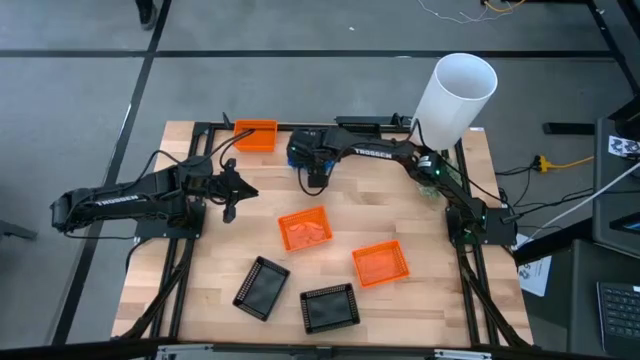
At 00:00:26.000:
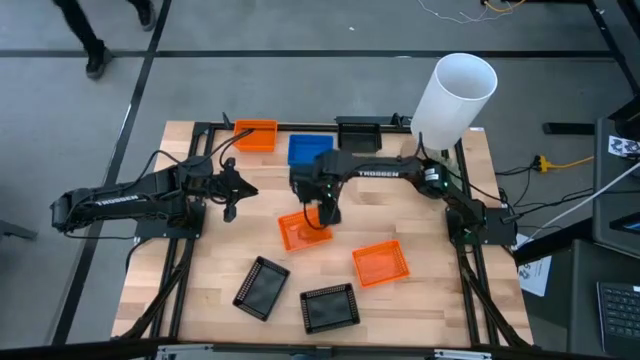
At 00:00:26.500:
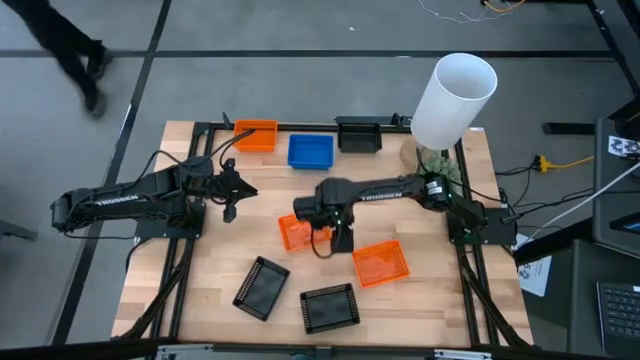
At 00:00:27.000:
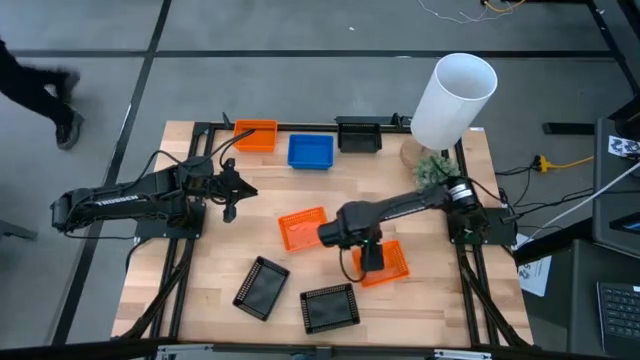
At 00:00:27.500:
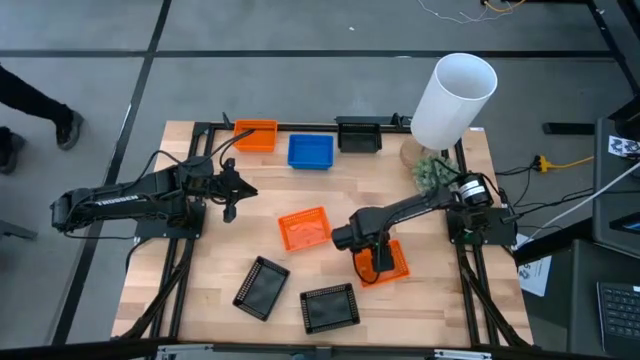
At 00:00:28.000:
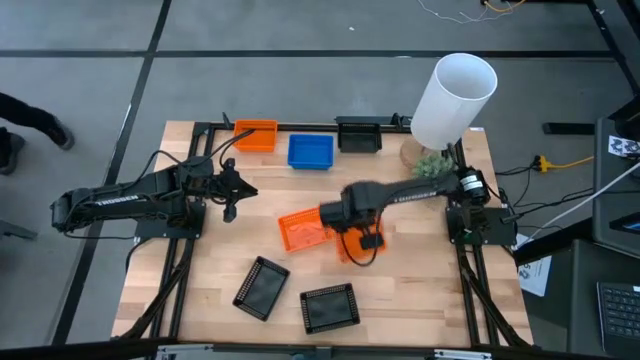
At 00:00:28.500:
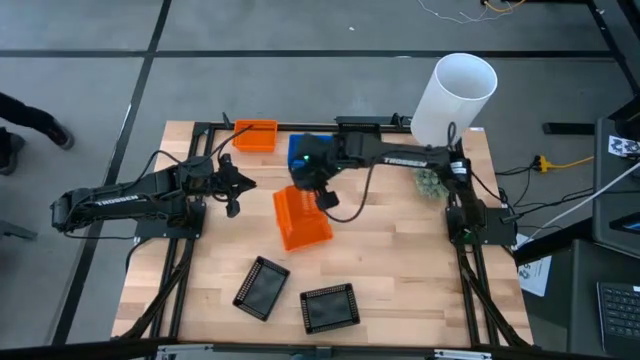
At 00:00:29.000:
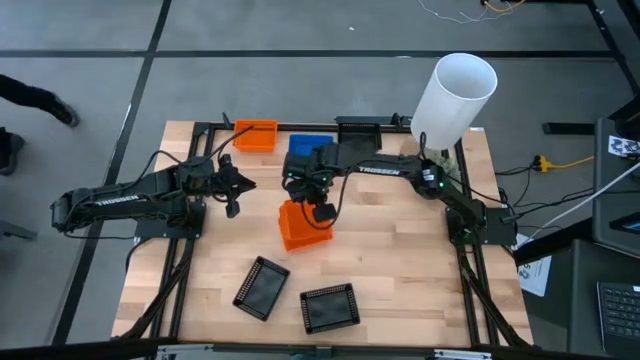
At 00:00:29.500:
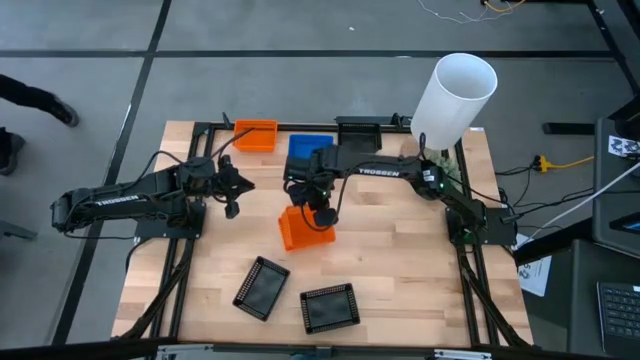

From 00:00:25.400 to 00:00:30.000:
Stack the bottom orange bin on the middle orange bin

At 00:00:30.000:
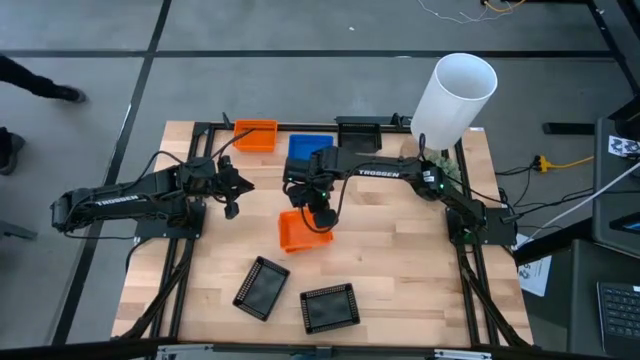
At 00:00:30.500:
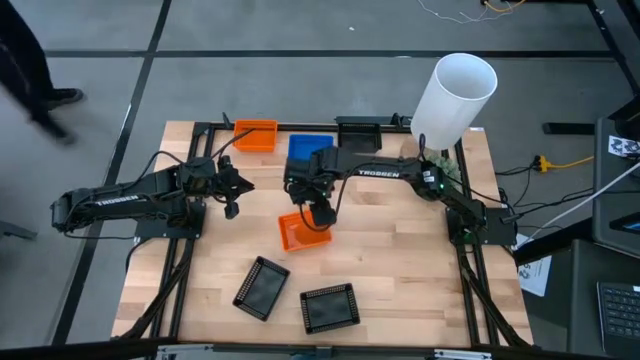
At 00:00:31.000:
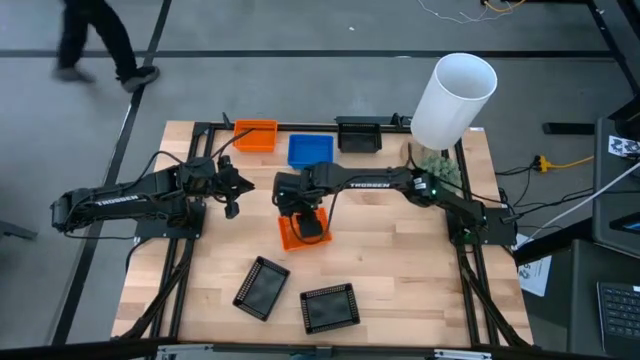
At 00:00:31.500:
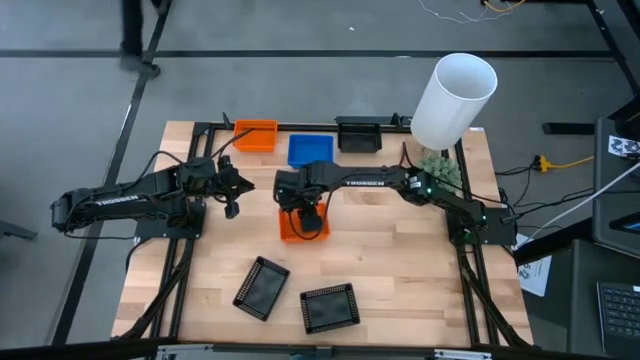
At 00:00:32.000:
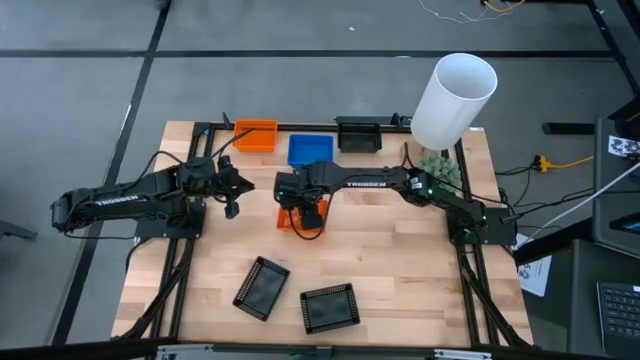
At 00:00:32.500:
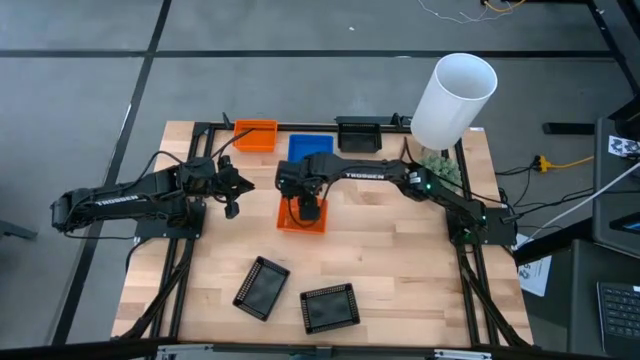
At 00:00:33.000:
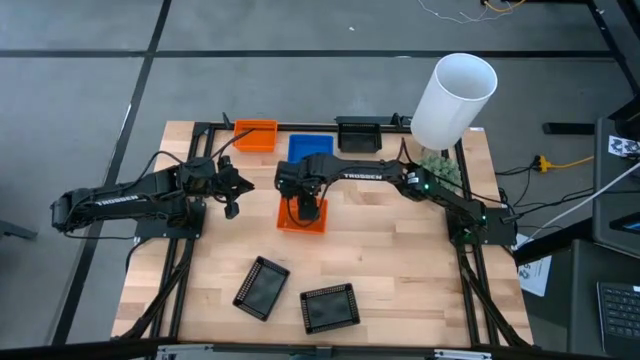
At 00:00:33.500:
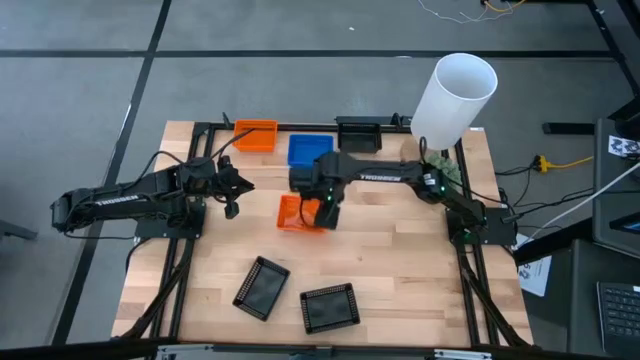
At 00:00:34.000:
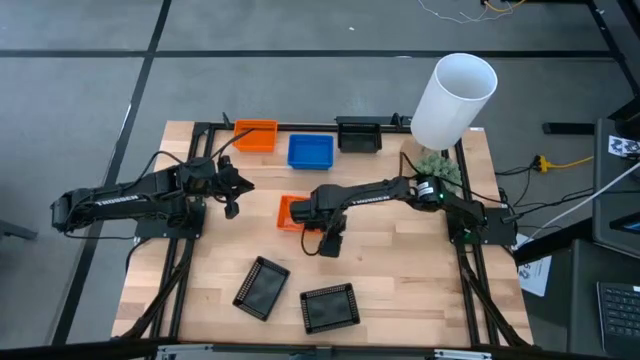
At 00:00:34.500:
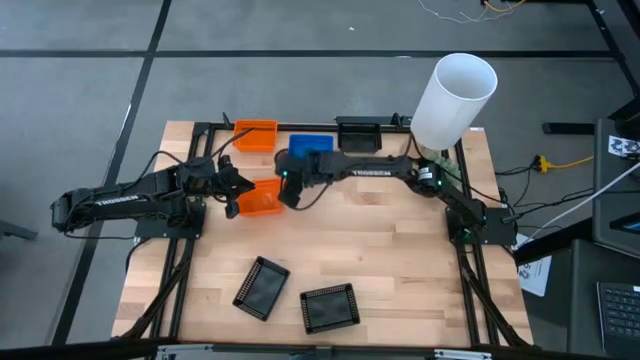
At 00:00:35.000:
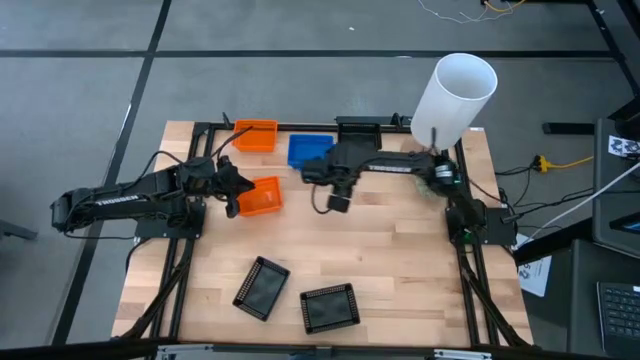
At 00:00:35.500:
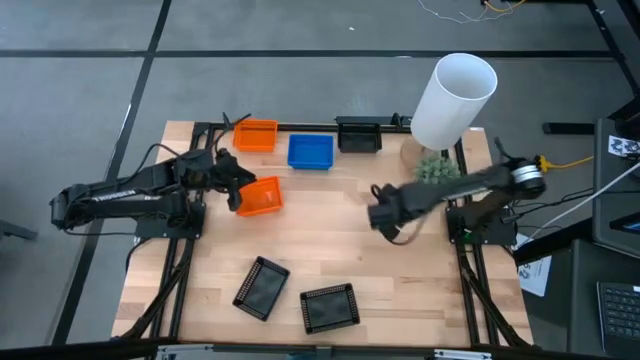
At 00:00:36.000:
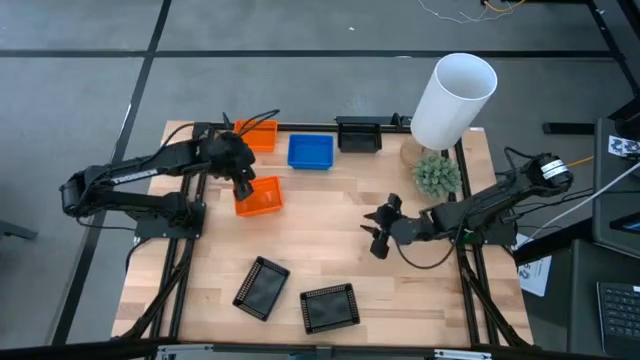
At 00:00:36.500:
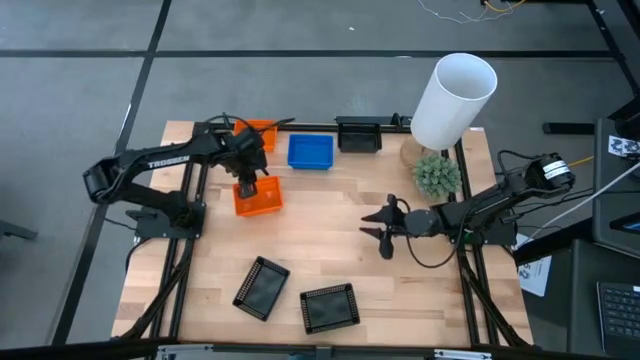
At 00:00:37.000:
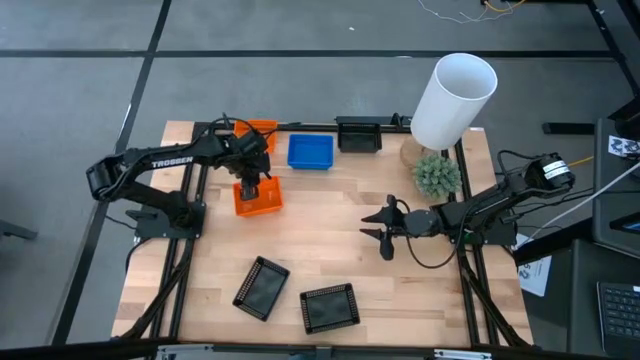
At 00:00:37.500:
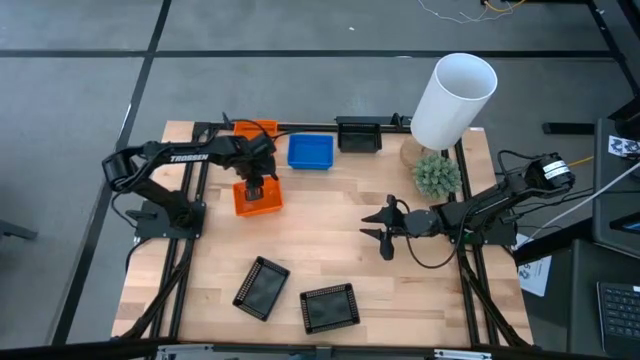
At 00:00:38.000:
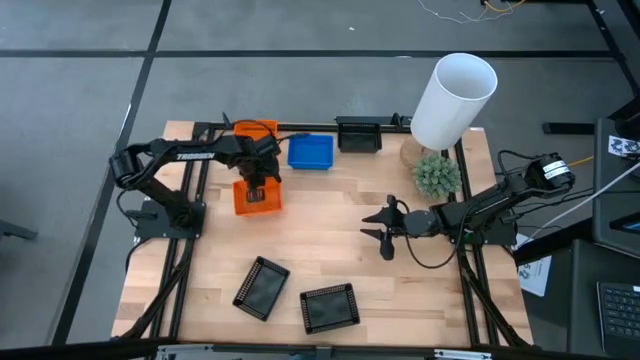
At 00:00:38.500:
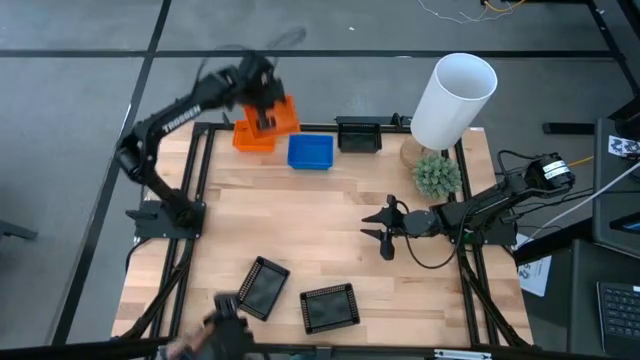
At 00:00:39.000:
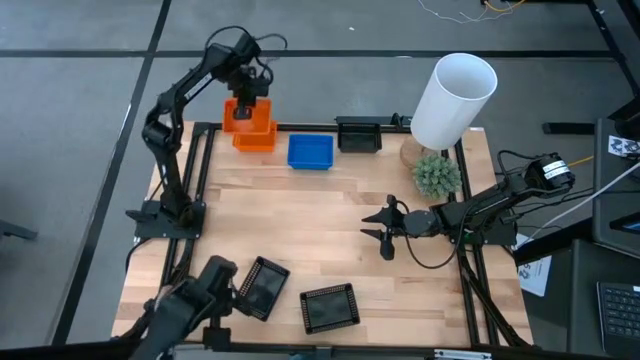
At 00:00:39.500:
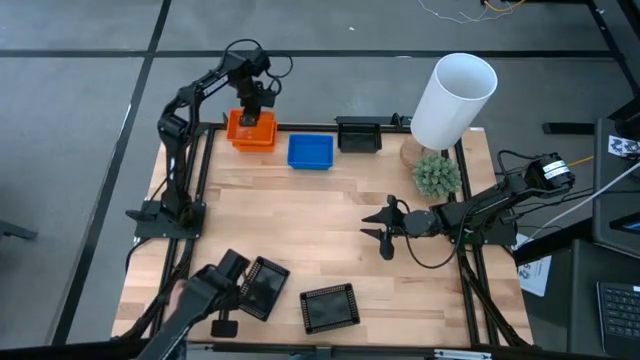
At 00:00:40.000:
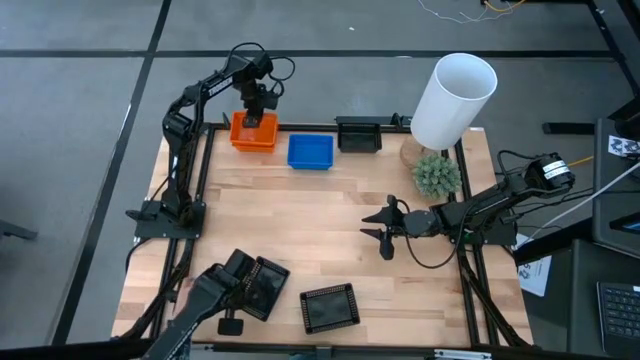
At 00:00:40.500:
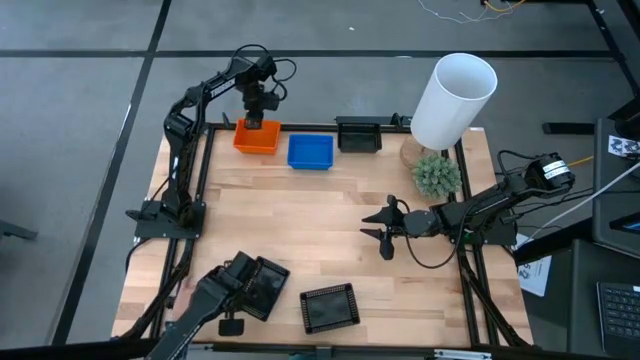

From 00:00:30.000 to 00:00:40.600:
Stack the bottom orange bins on the top orange bin

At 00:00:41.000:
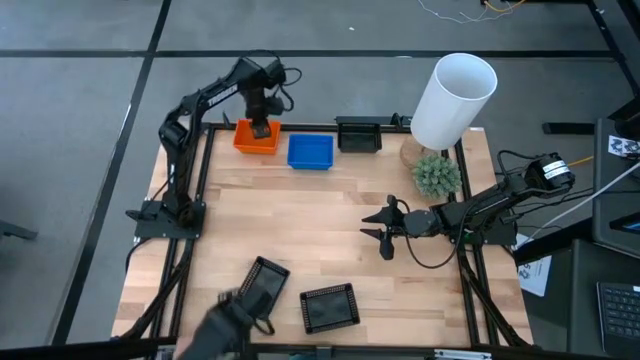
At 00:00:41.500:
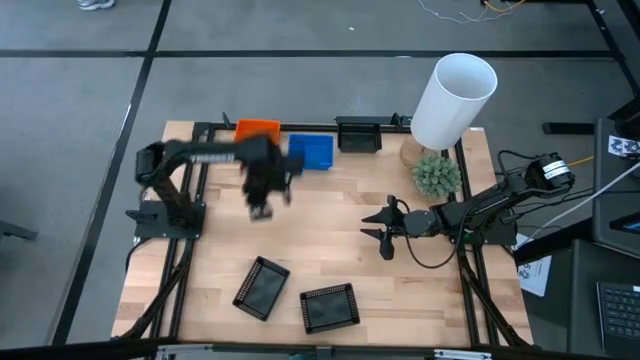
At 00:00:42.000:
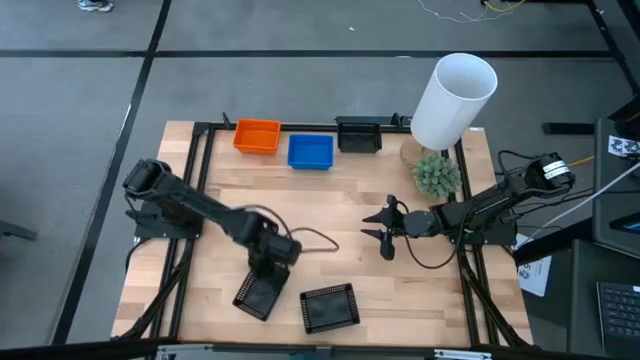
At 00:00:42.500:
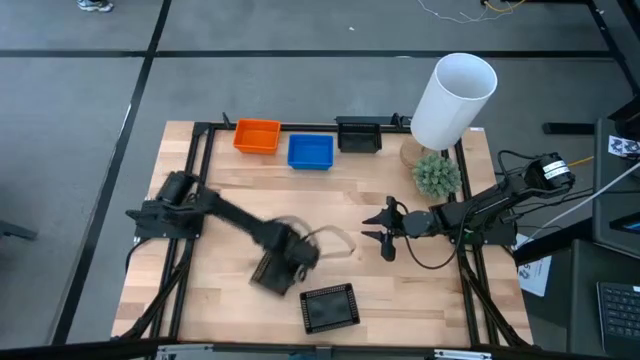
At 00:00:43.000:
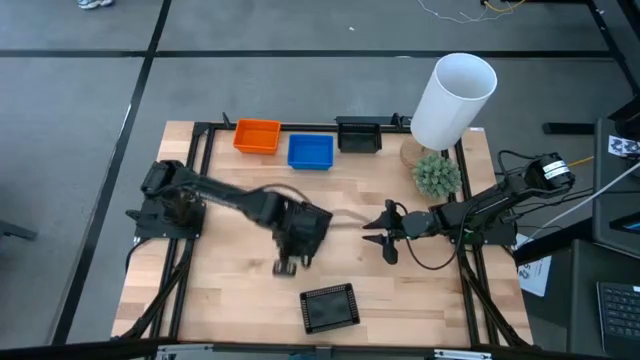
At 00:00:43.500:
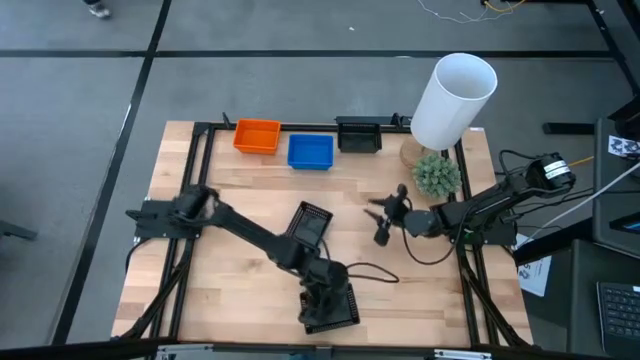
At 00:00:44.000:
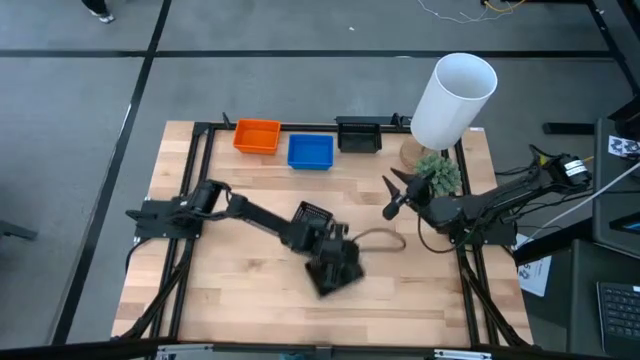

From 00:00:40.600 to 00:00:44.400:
Adjust the black bins
